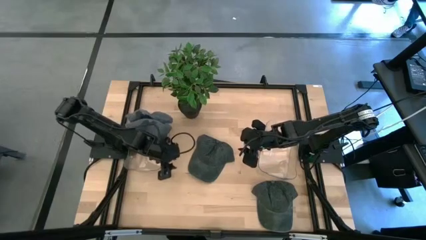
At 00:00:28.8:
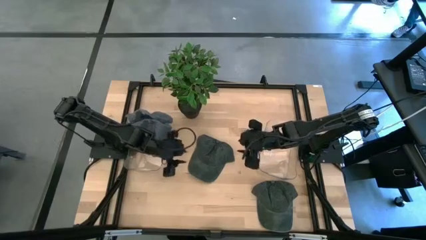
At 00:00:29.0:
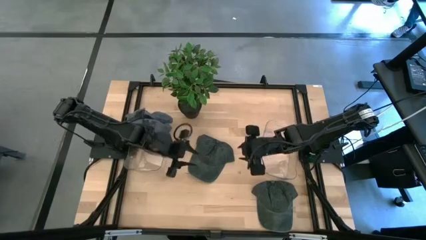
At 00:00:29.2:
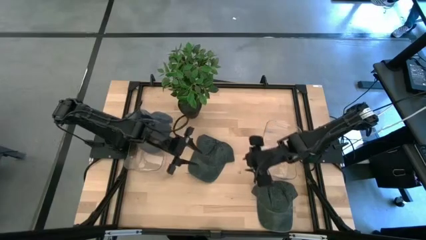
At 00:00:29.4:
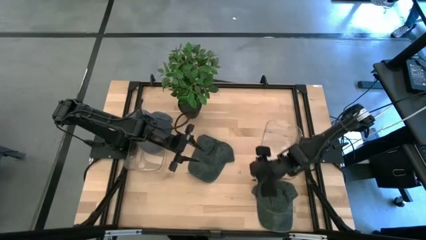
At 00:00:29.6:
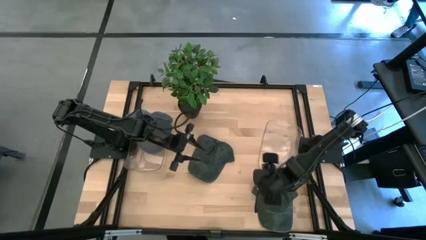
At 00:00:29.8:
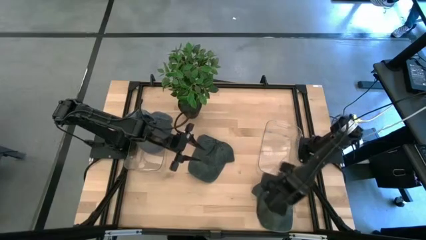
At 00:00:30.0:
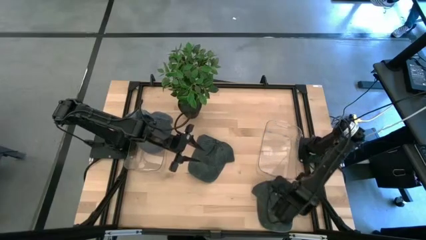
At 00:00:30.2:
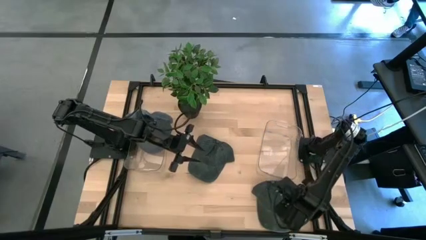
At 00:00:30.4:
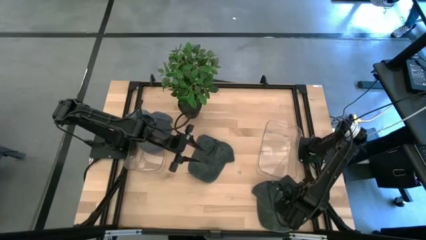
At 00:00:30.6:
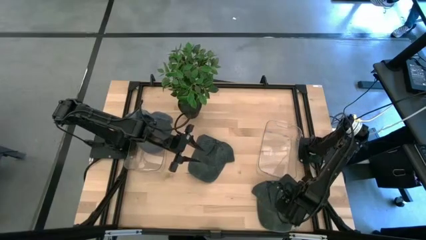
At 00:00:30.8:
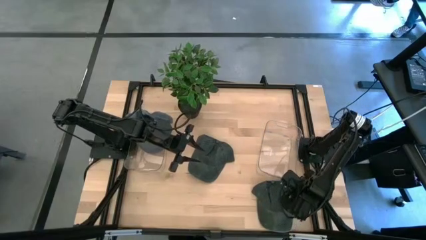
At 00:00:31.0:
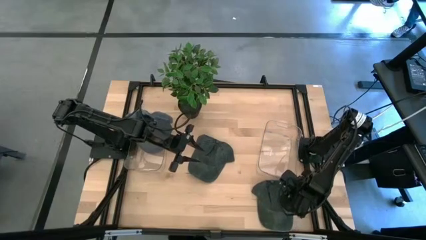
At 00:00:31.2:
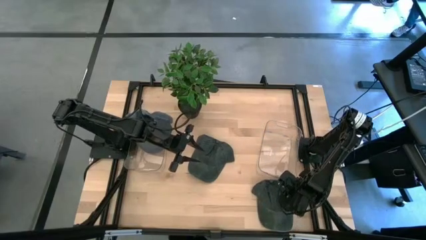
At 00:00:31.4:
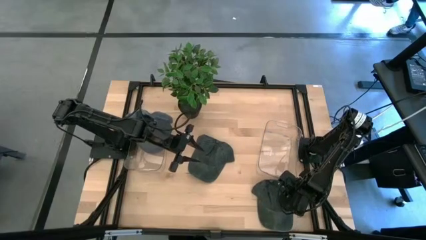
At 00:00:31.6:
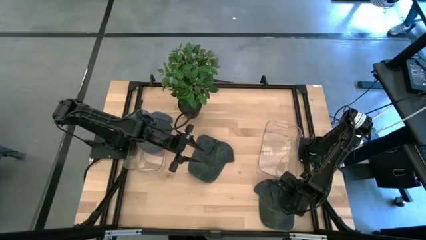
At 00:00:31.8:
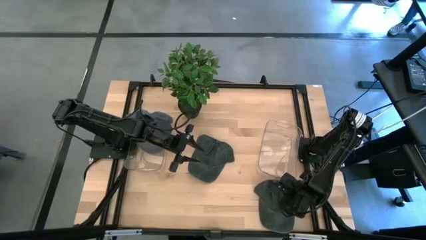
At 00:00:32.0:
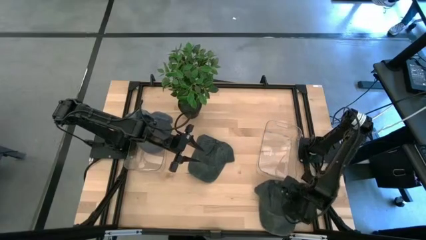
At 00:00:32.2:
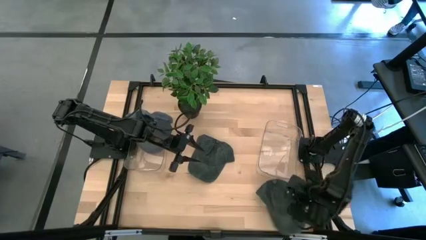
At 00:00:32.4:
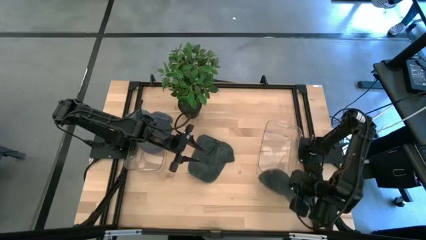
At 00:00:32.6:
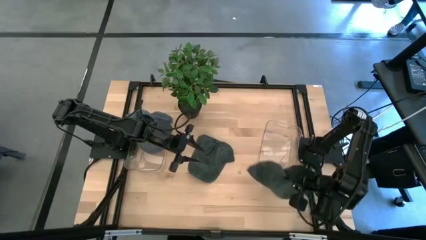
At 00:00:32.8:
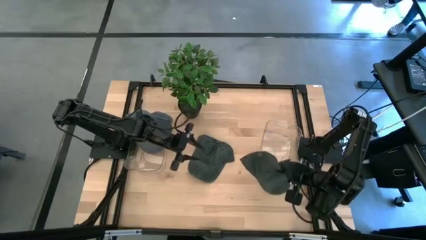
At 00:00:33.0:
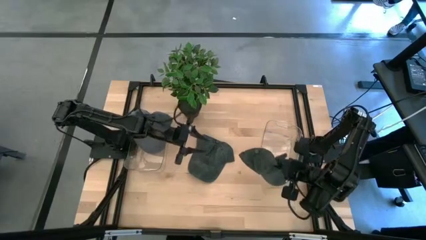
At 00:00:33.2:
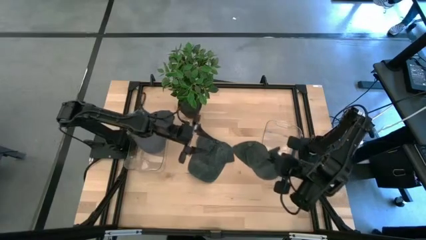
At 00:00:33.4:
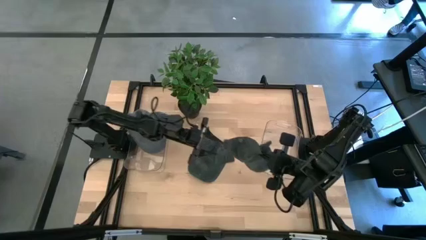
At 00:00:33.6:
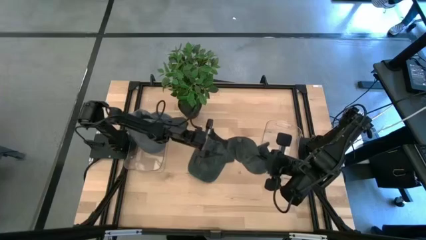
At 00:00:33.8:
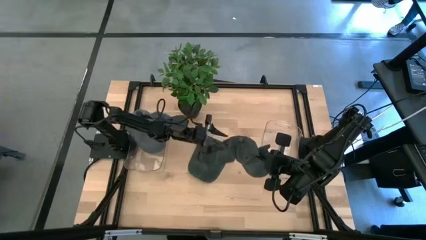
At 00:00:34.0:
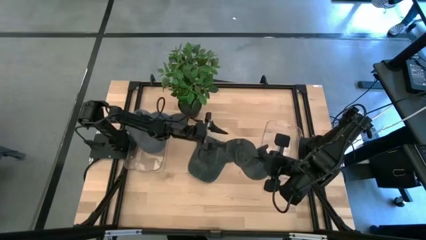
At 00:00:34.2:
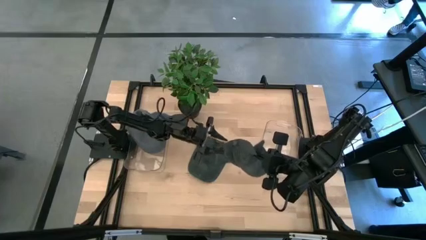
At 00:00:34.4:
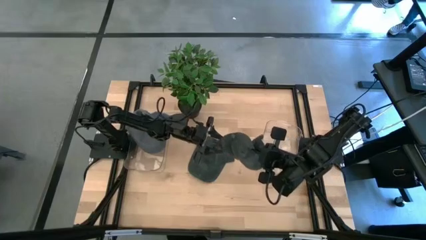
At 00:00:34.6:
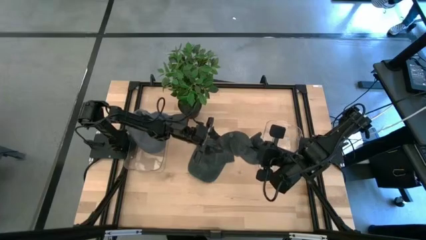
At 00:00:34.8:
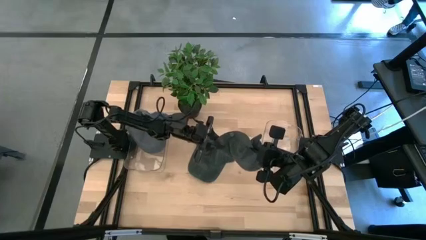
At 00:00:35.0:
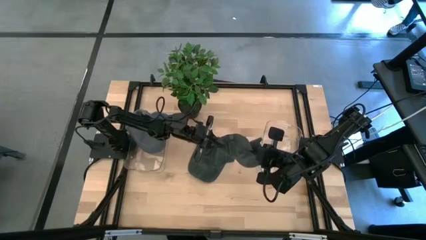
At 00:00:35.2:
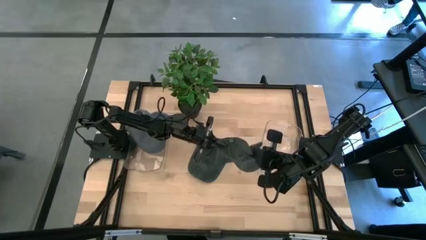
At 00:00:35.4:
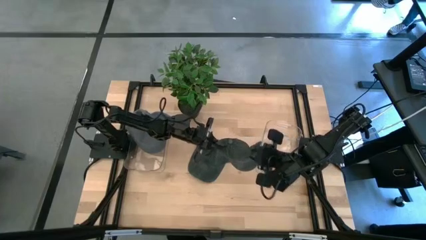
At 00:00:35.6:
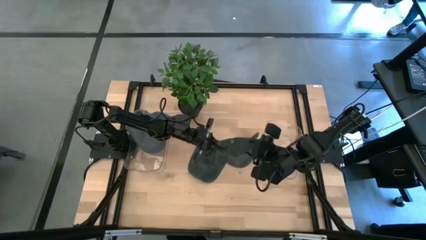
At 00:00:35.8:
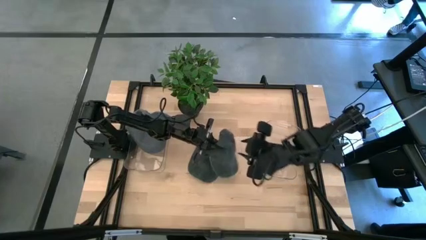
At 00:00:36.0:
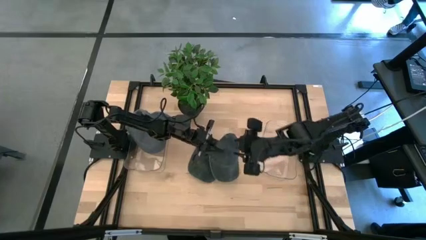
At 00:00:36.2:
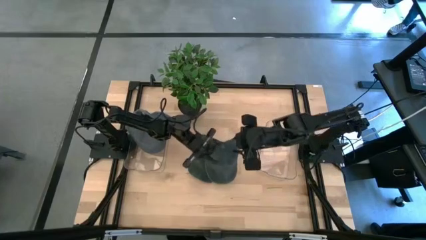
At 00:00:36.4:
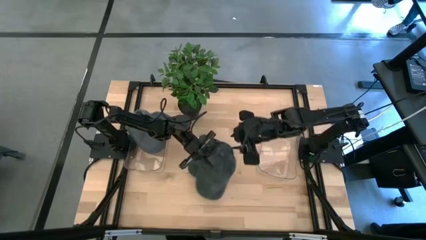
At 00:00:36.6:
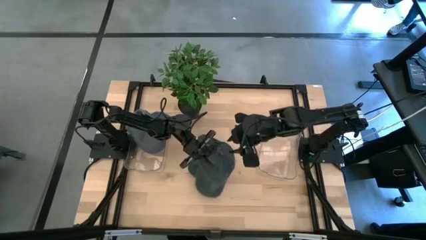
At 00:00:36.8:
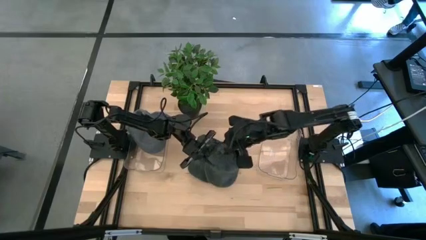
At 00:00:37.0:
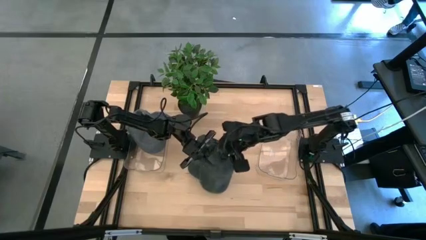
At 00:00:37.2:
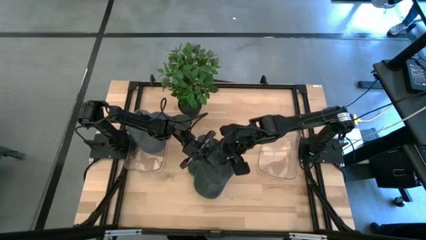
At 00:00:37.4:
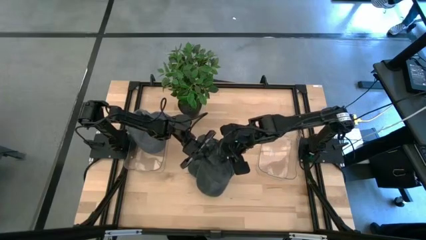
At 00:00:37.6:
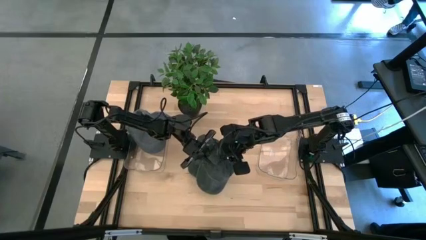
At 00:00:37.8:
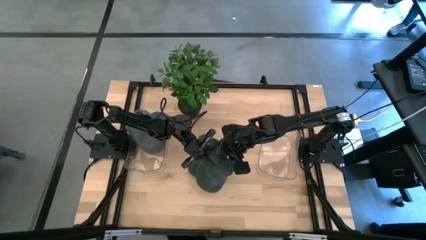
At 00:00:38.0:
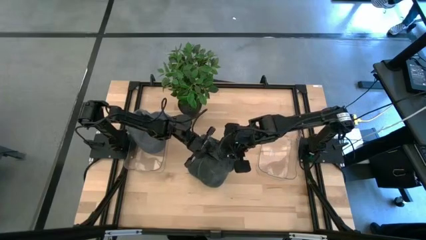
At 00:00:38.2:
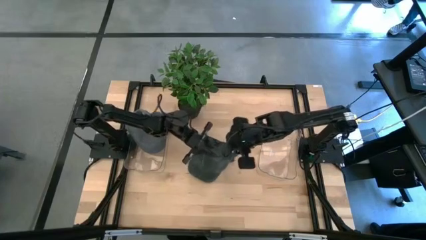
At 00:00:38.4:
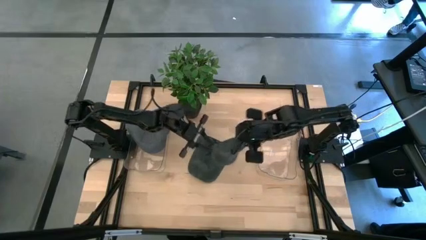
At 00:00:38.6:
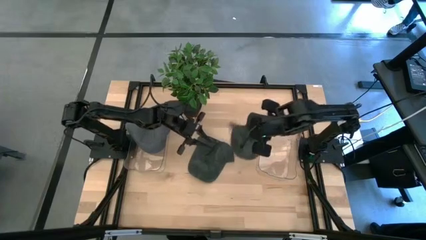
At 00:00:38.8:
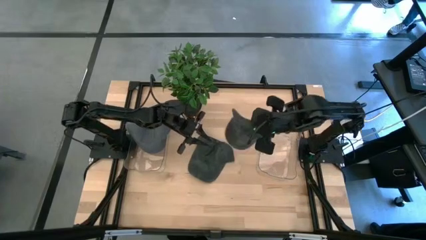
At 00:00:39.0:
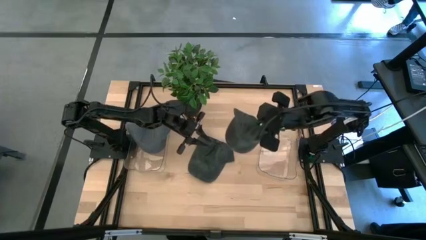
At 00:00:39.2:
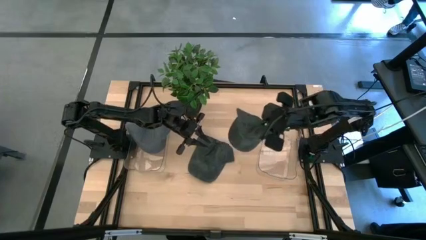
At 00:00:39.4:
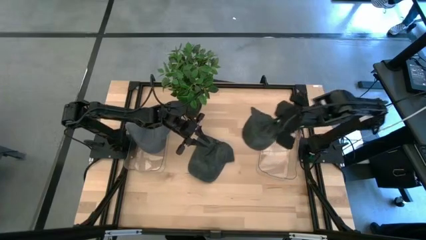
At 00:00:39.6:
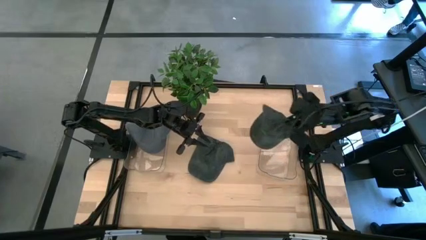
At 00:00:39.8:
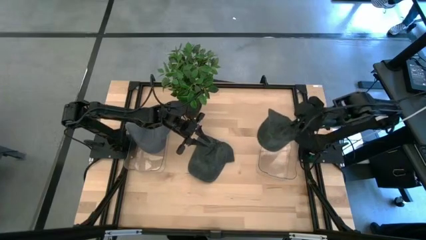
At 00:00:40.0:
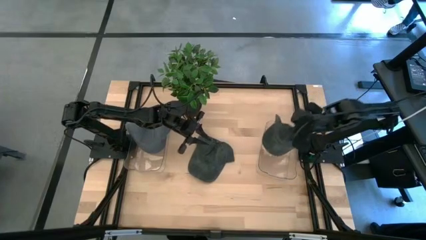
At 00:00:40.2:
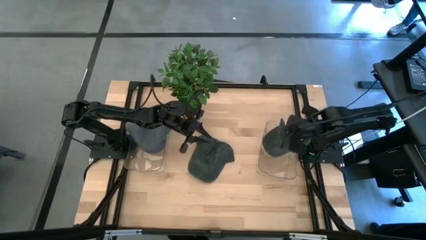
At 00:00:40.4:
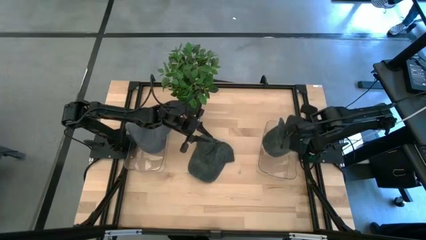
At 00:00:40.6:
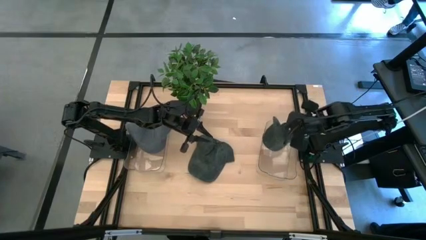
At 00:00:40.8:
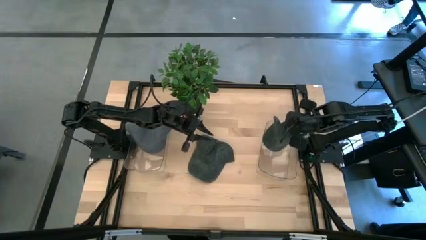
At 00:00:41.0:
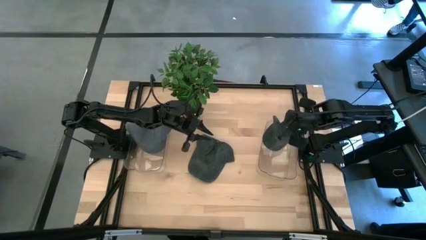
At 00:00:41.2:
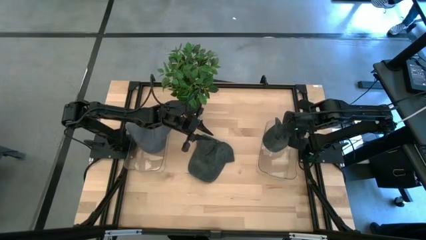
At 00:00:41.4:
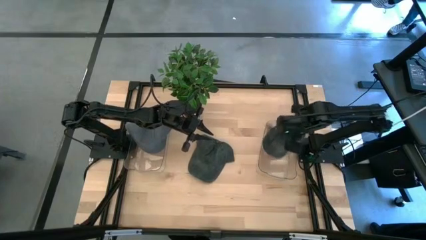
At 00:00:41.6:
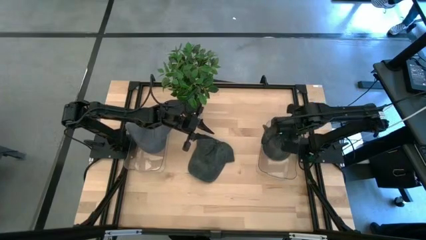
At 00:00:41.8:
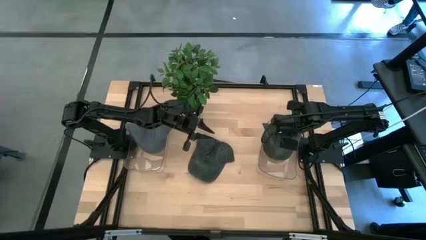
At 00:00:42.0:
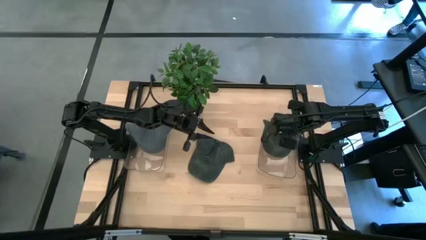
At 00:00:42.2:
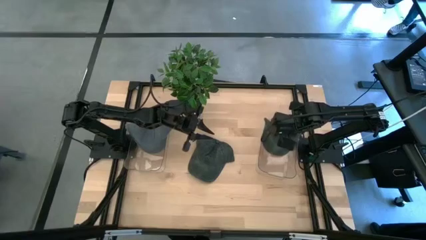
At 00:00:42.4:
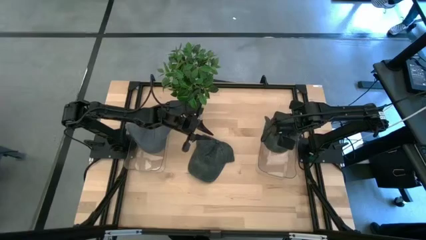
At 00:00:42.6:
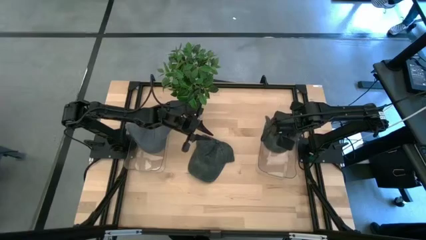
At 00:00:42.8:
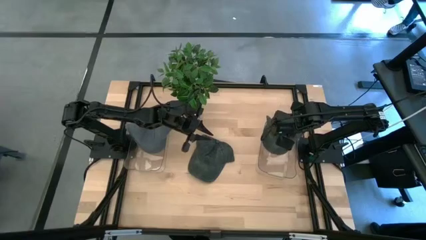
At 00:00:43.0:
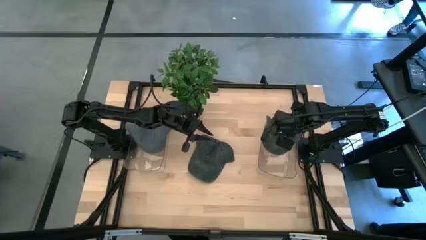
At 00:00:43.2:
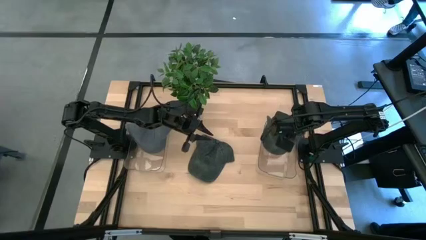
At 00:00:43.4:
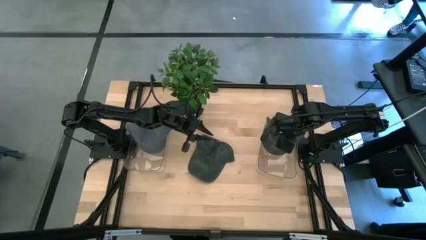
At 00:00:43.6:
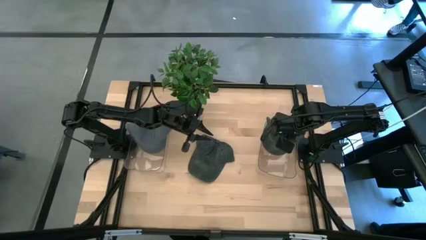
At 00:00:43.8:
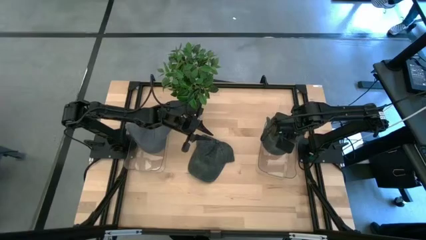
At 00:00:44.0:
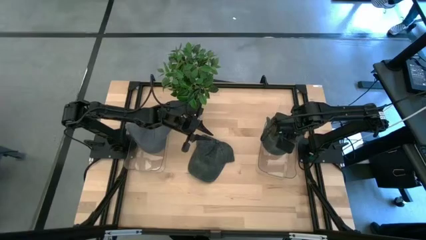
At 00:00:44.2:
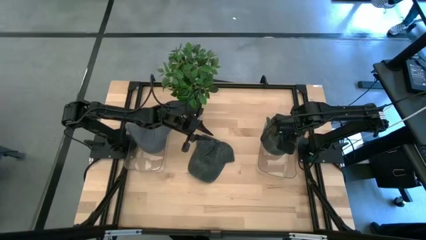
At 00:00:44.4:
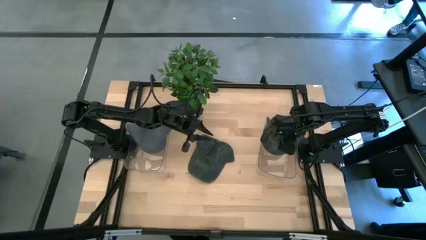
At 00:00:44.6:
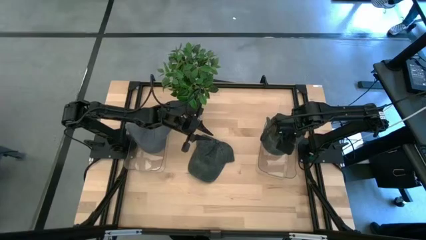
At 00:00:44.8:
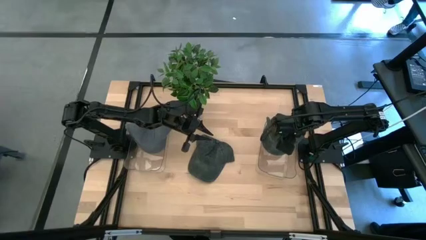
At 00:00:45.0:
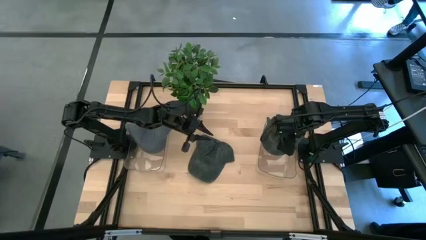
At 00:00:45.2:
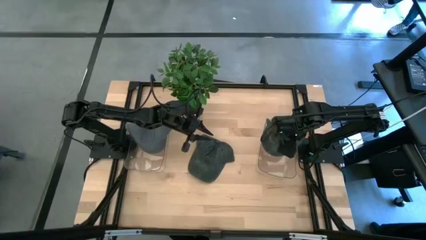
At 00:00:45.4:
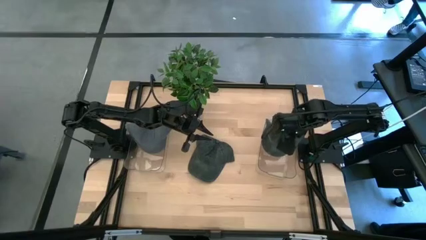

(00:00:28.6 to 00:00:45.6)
Task: Pick & Place hat
Put the bottom black cap into the right transparent bin
